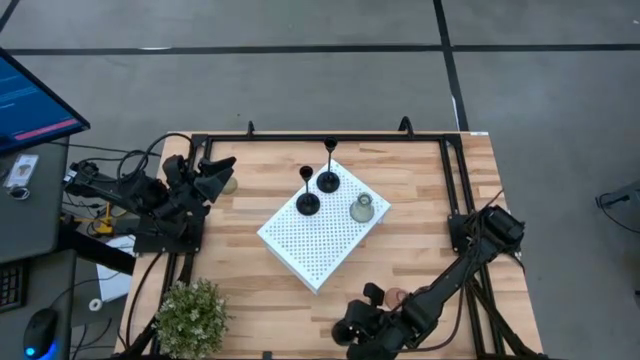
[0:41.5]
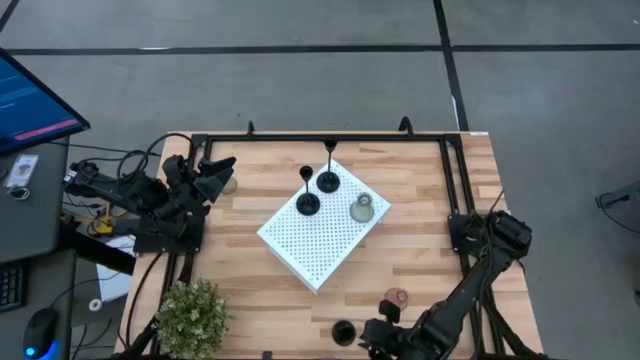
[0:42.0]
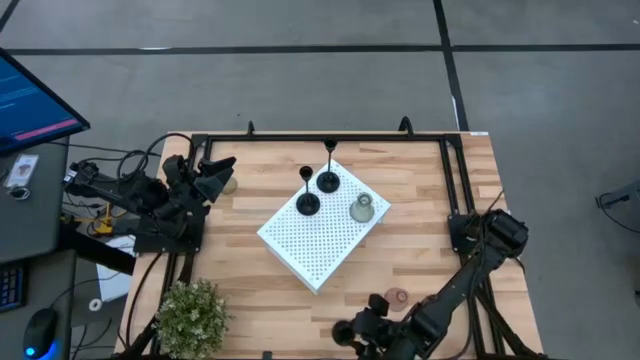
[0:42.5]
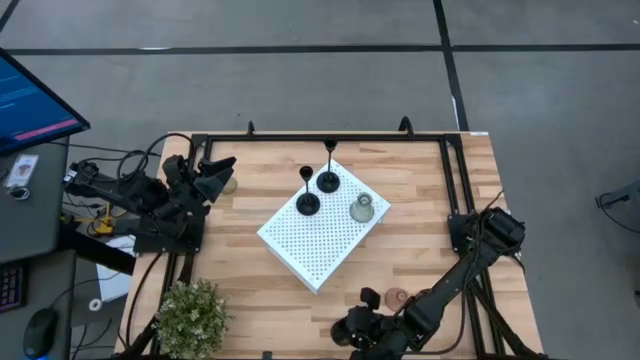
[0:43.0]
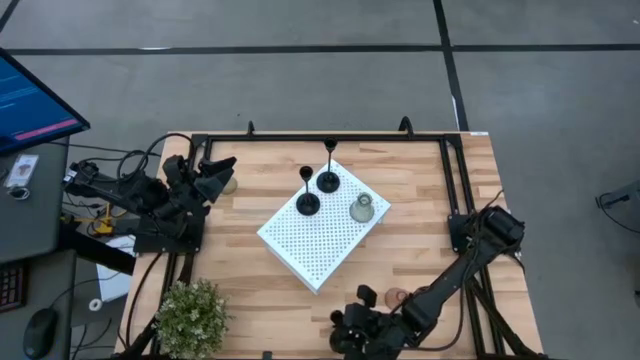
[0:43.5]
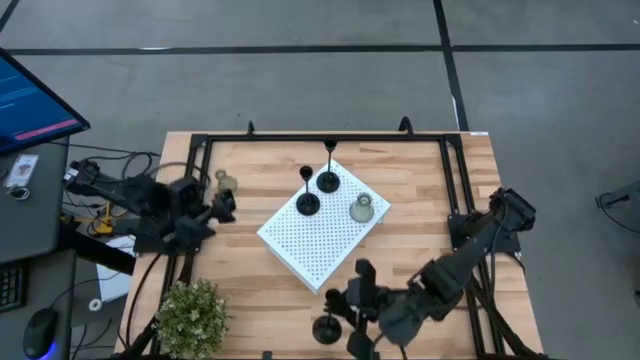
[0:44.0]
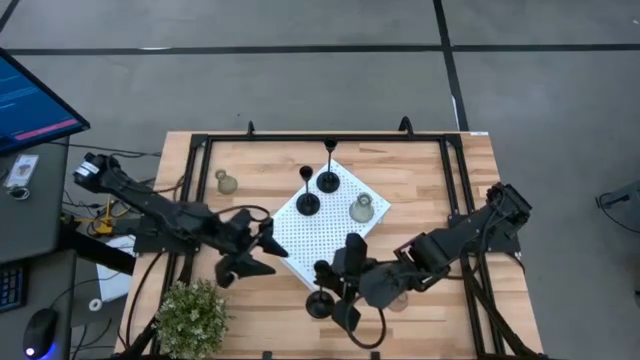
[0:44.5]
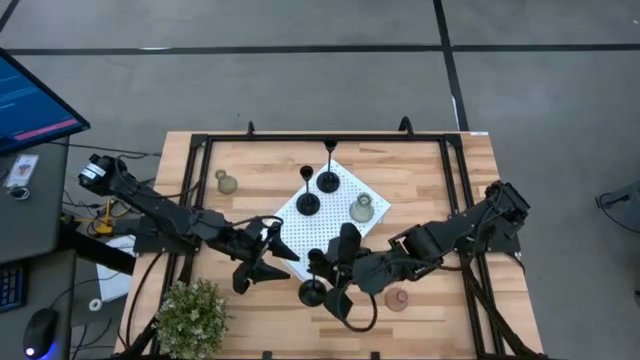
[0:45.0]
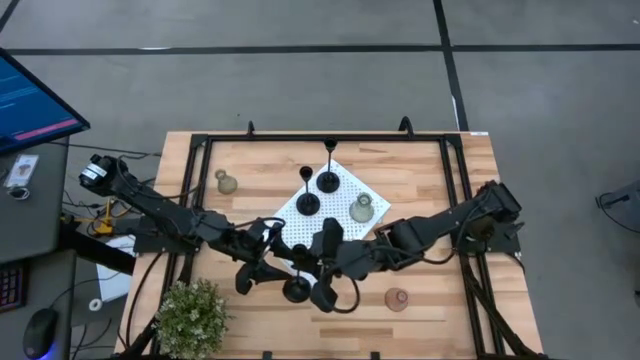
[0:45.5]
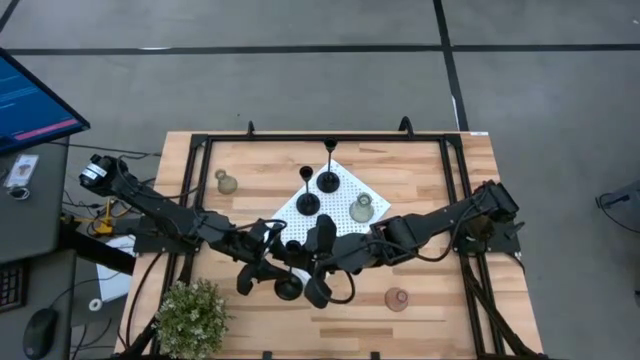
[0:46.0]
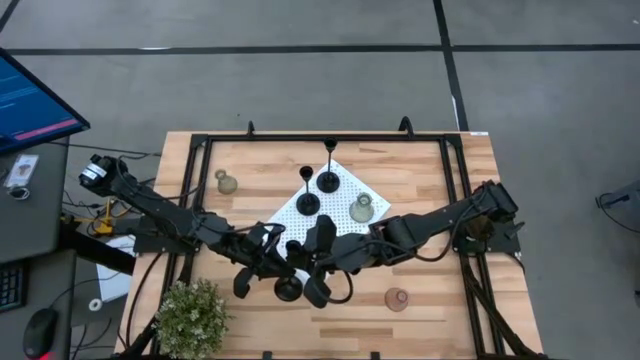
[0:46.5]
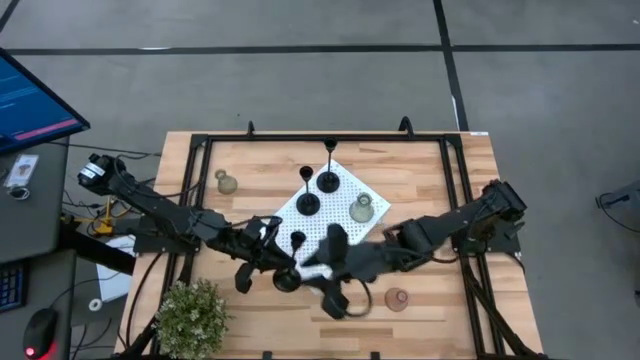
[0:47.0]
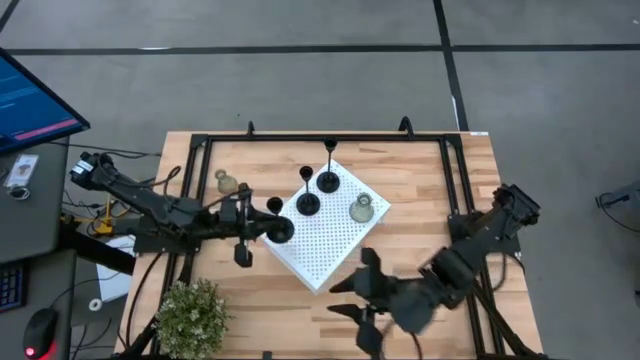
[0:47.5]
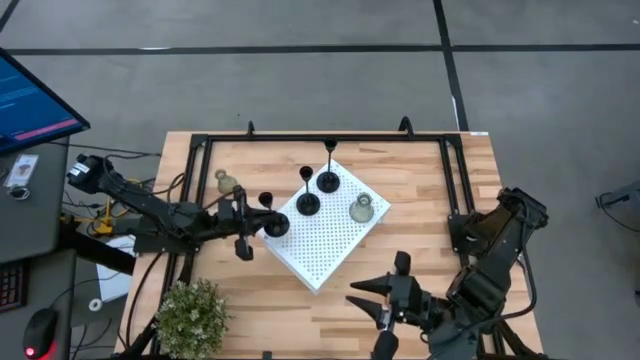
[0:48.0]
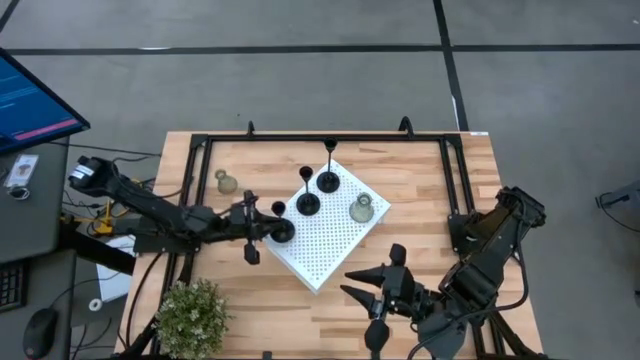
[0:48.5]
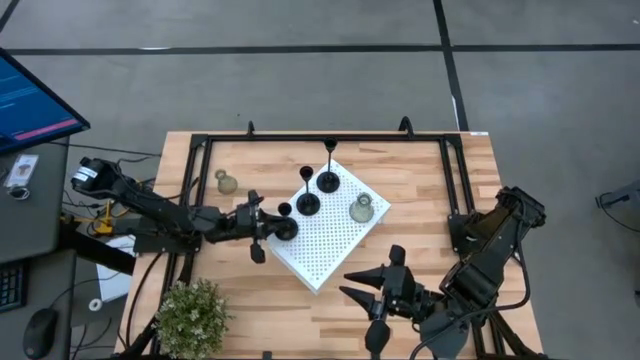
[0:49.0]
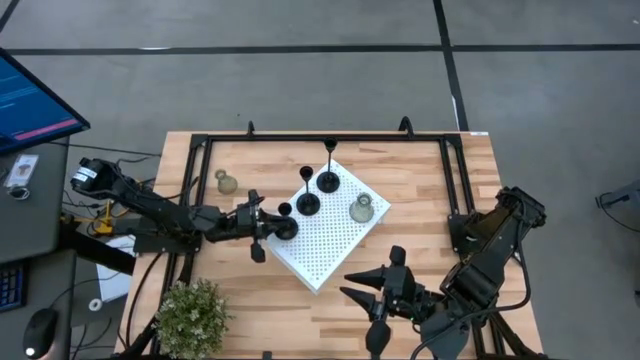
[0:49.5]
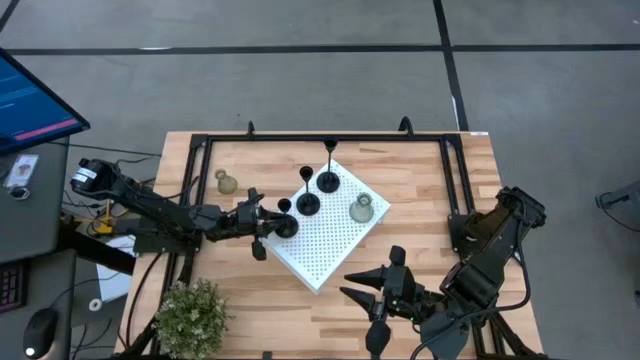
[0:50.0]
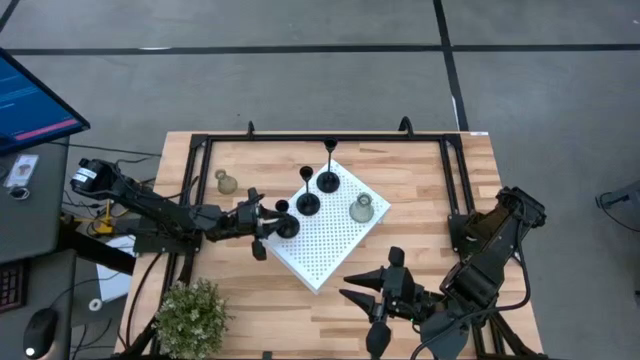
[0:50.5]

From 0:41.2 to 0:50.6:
Task: Pick & Place candle stick holders
Put the black candle holder on the shelf

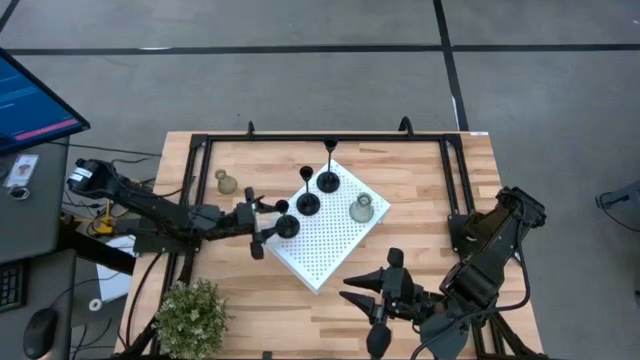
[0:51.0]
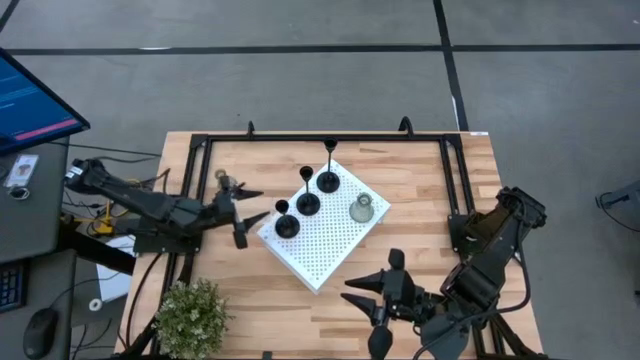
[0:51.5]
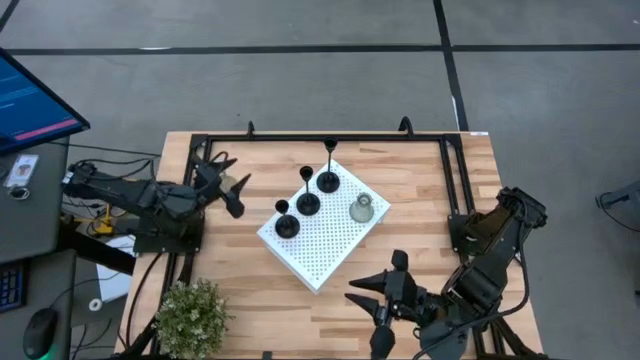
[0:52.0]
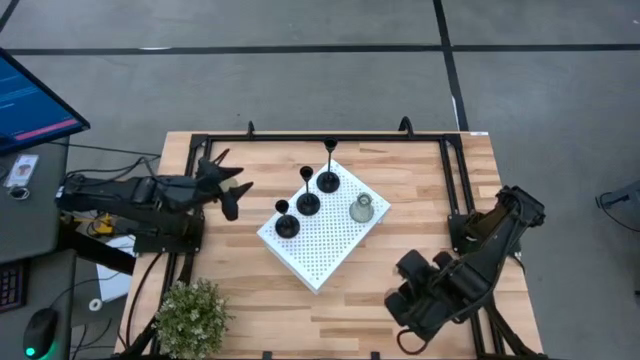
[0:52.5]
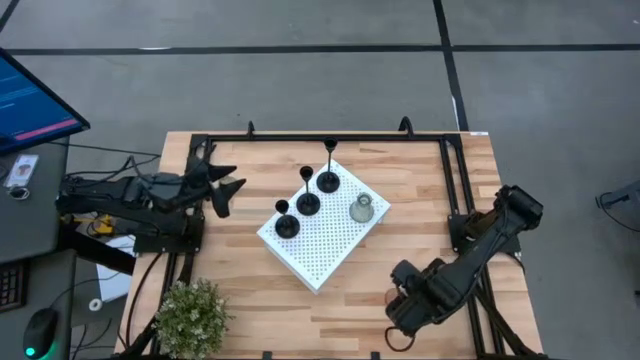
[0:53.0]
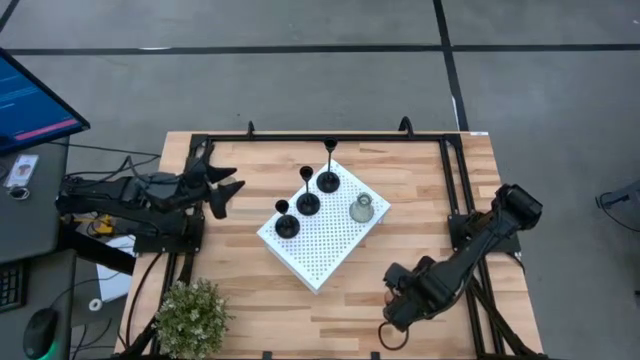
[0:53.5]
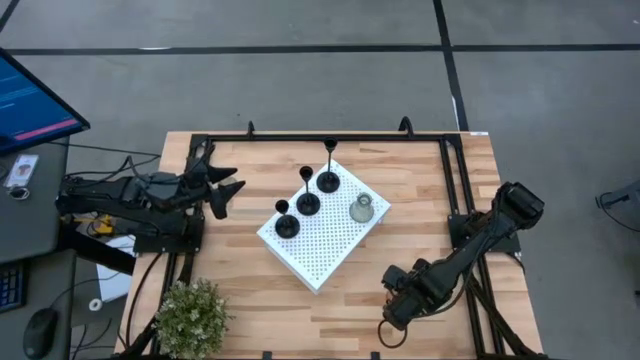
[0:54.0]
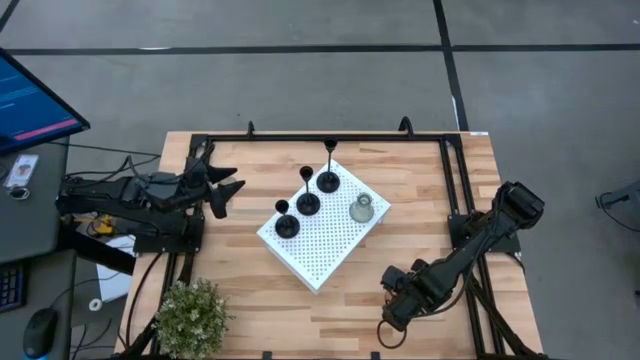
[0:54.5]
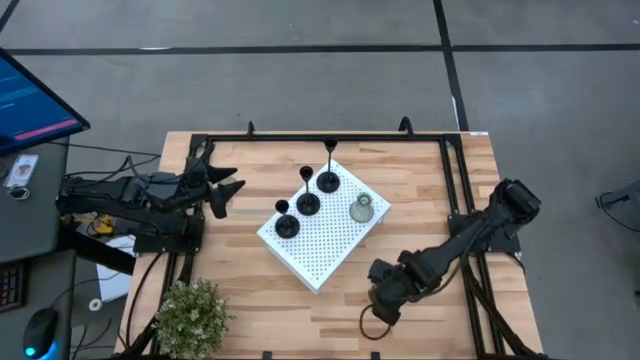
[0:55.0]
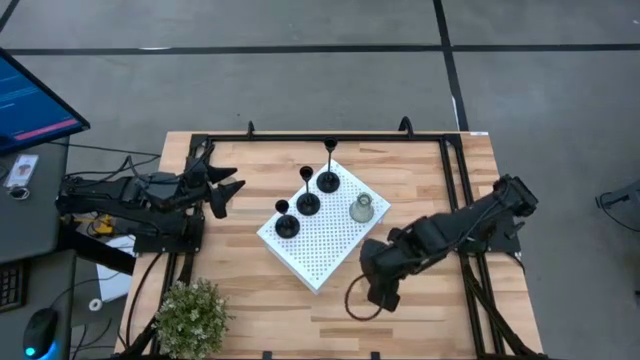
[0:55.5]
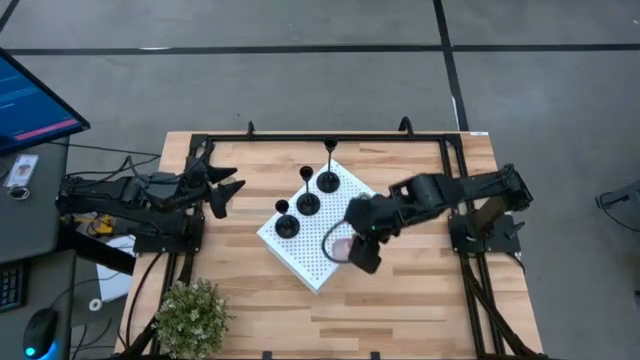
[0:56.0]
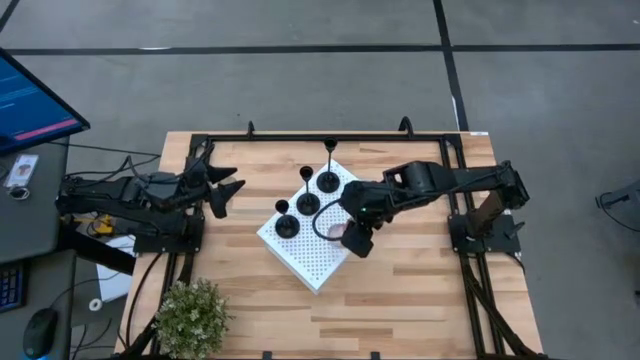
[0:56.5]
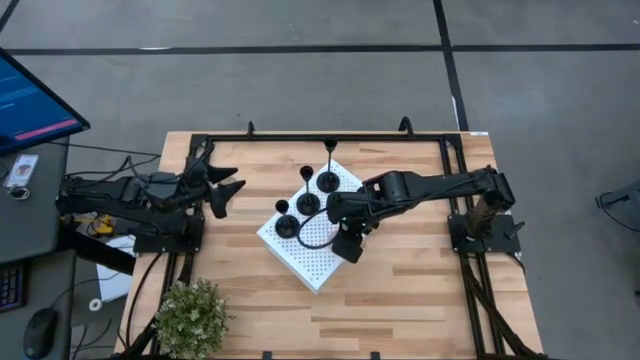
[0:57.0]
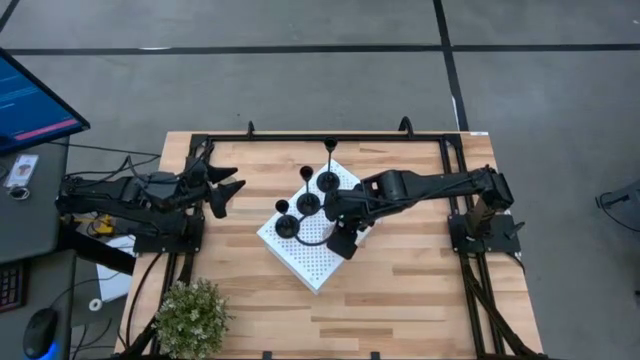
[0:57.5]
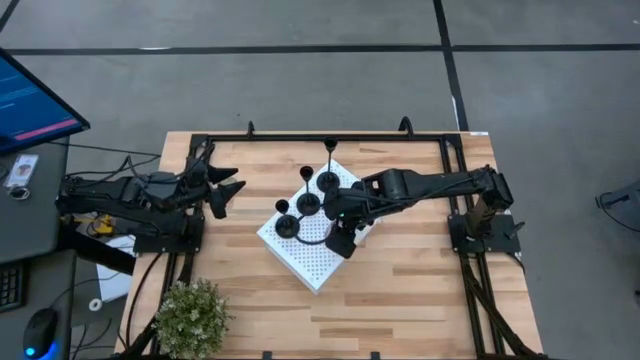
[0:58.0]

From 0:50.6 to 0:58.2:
Put the pink glass candle holder on the shelf

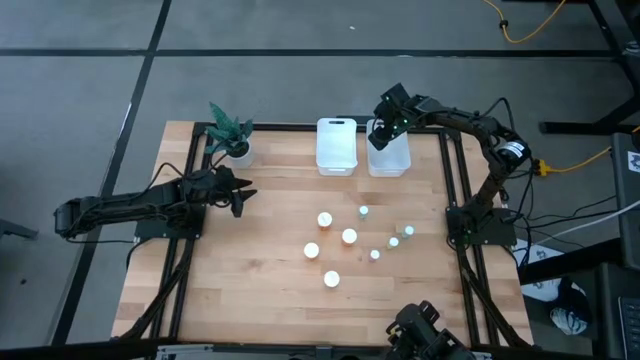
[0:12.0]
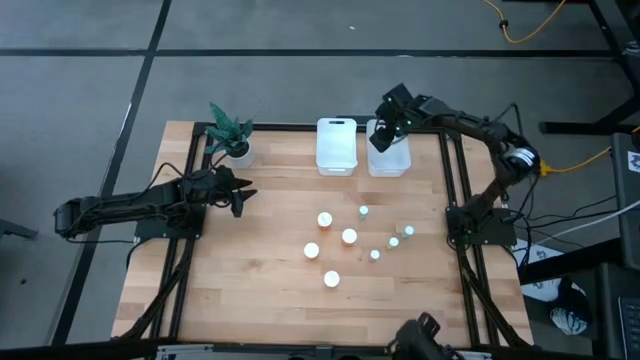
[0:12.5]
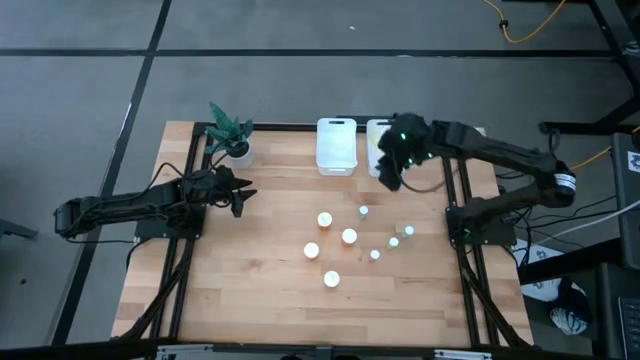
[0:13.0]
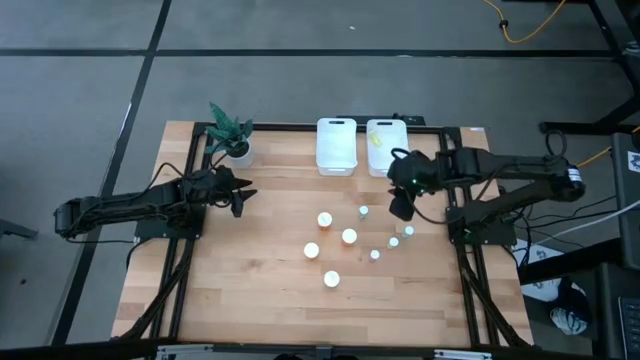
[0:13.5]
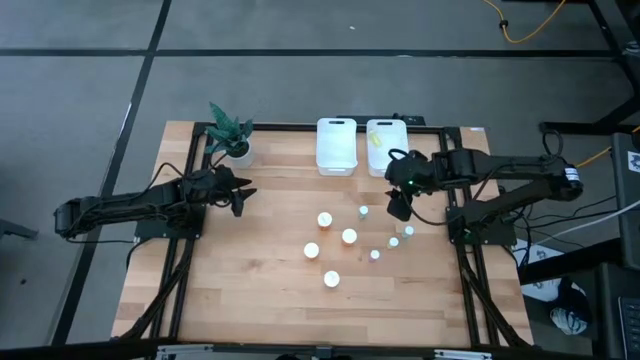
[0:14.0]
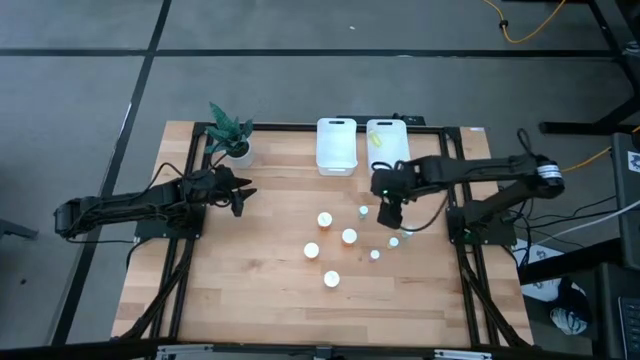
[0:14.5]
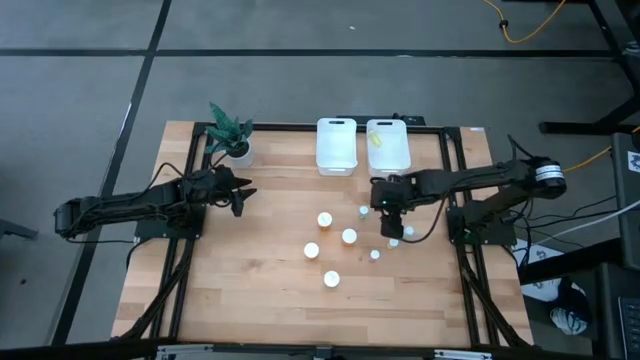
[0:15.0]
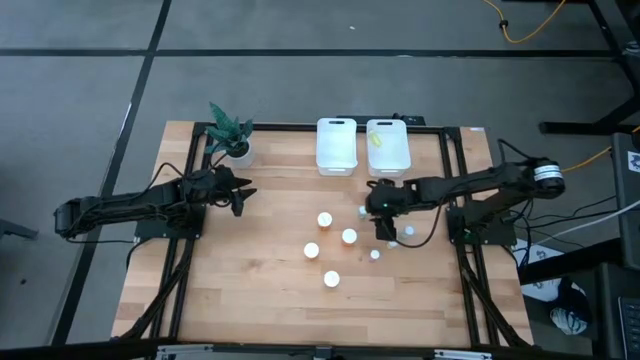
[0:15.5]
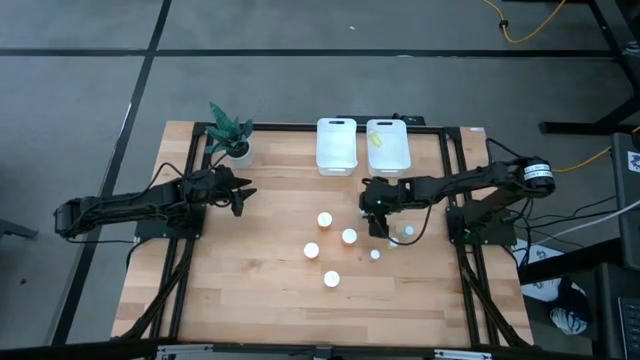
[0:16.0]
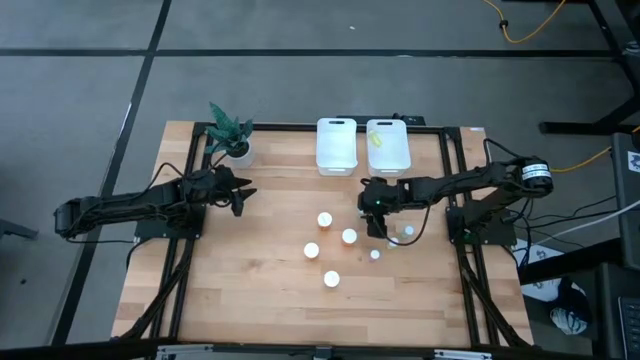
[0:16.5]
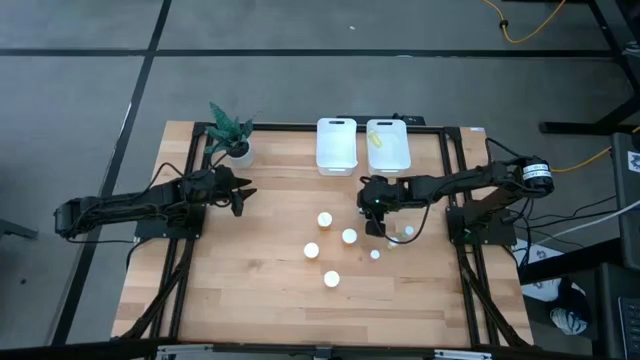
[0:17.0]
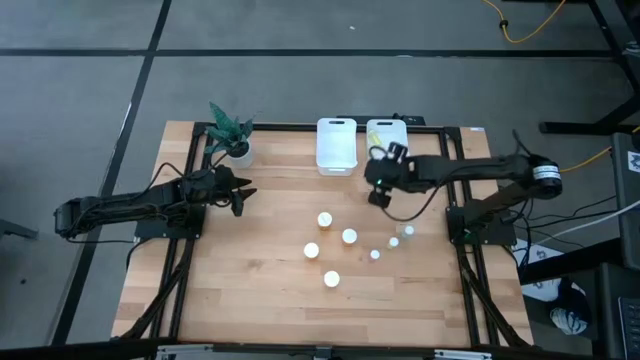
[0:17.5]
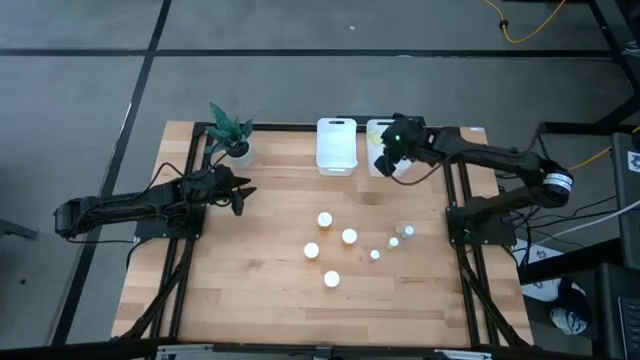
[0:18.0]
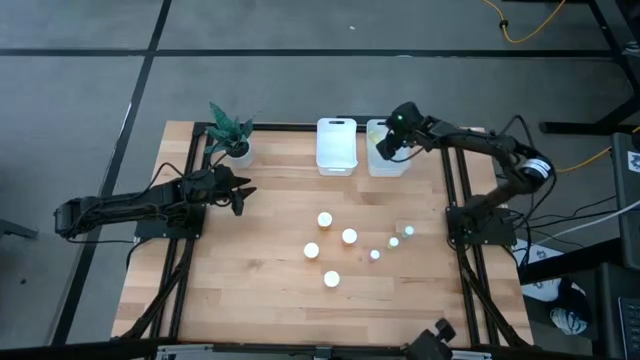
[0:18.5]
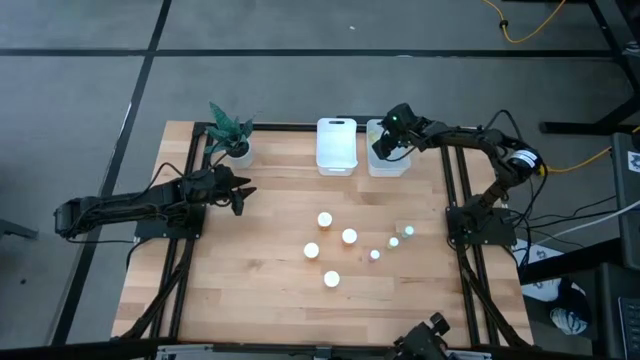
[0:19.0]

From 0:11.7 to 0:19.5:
Task: Pick and place medicine bottles into bin by pill shape (circle, oval)
Put the small blue pill bottle into the right white bin
